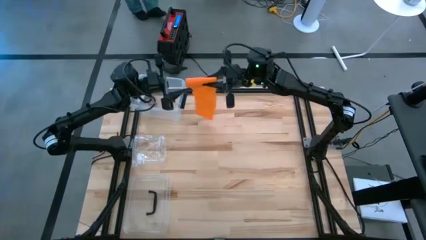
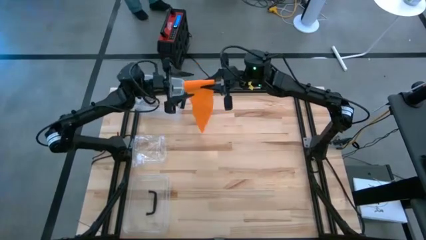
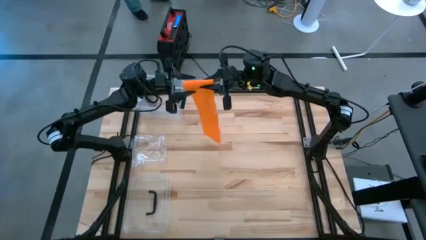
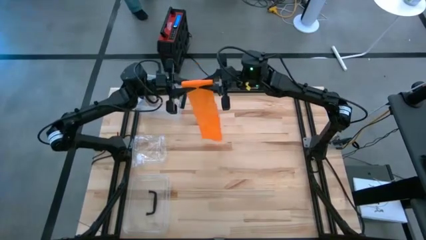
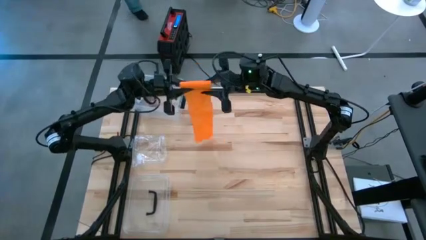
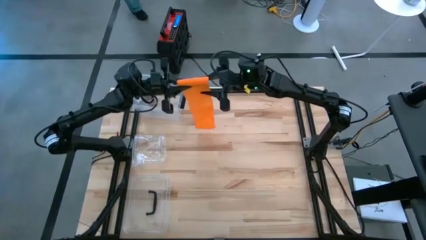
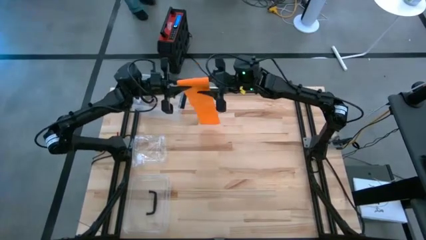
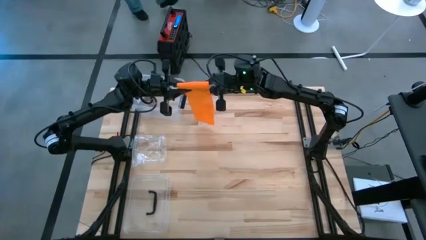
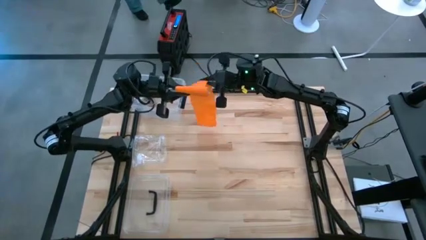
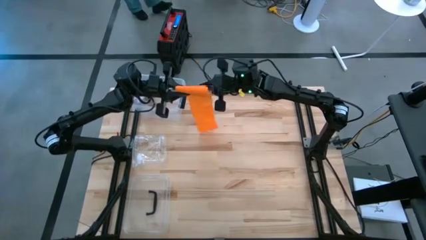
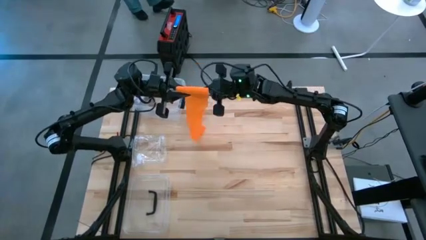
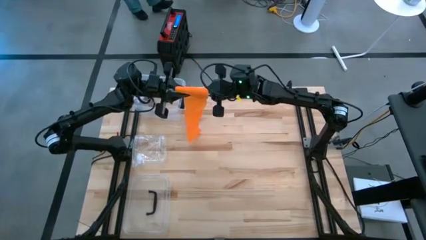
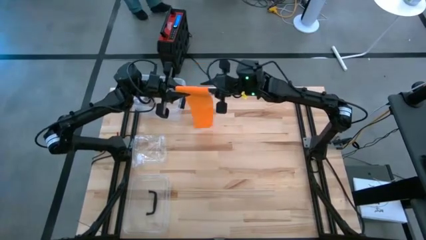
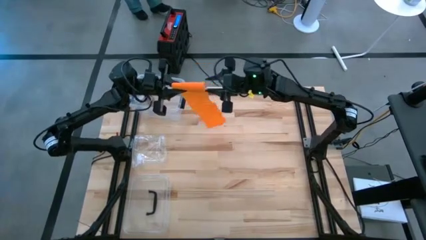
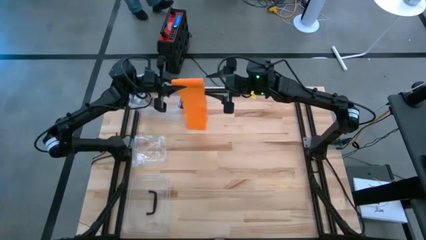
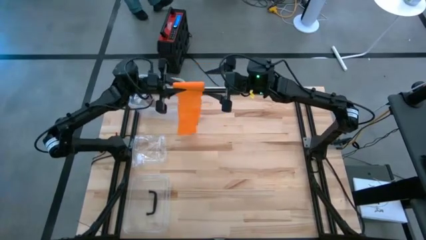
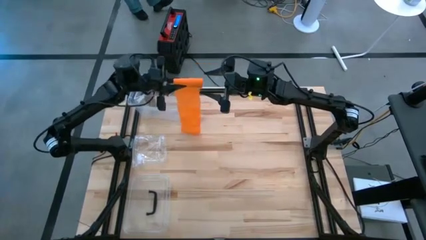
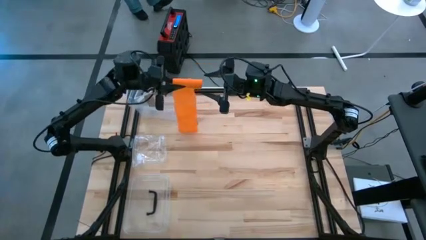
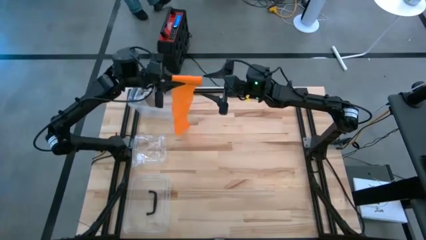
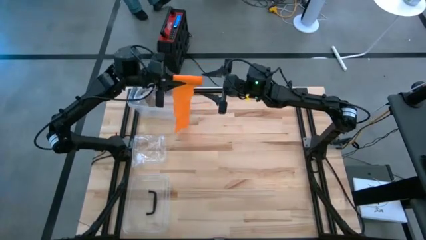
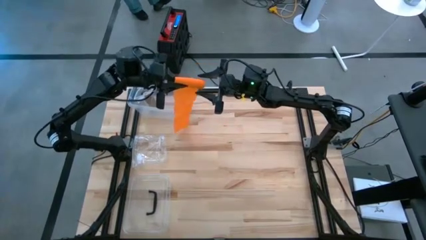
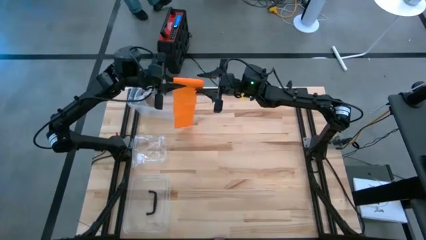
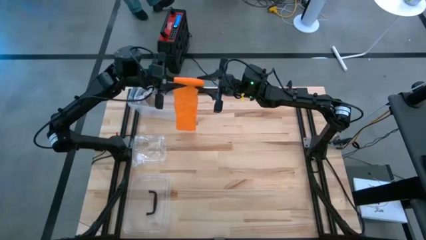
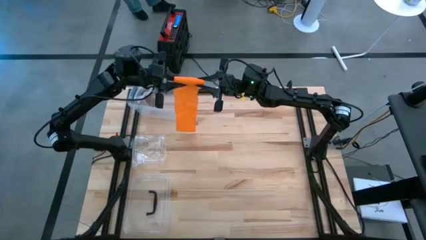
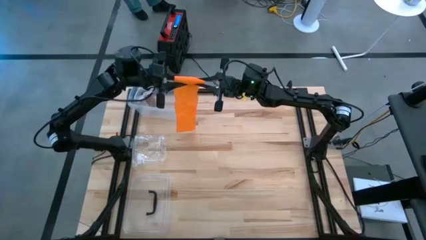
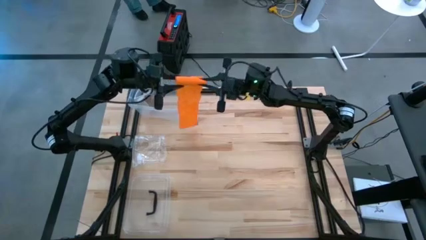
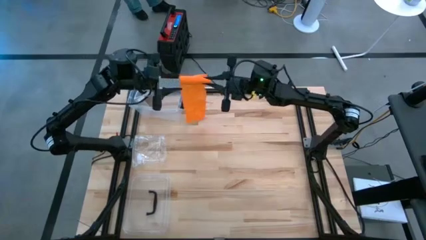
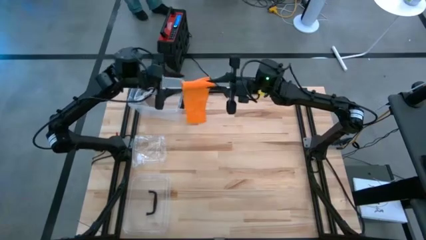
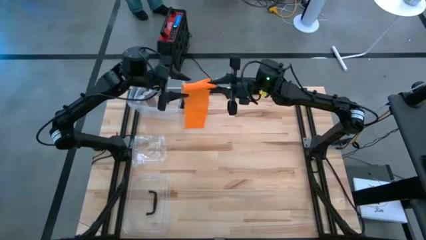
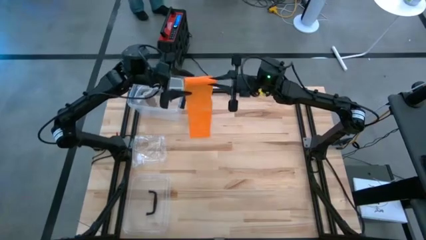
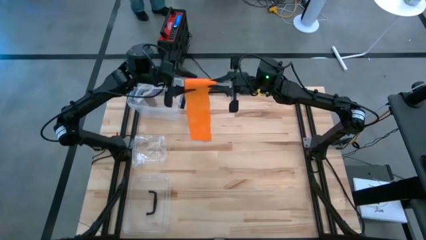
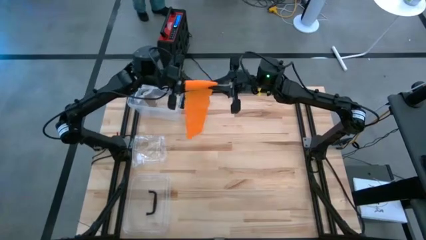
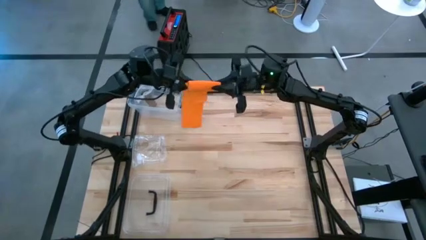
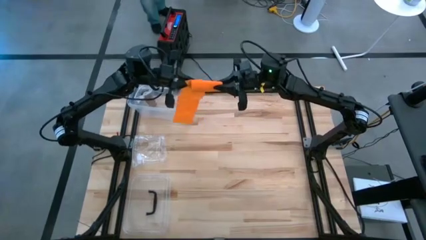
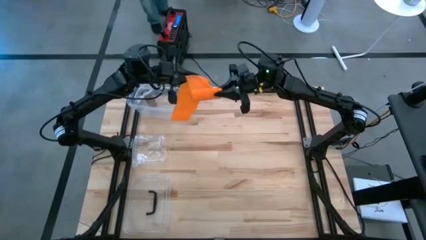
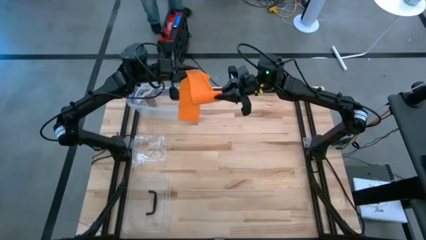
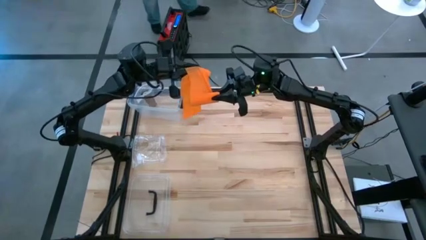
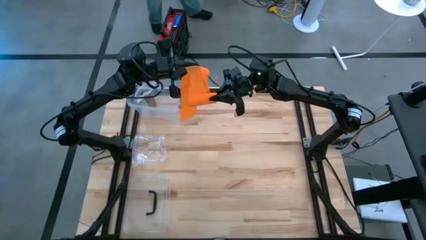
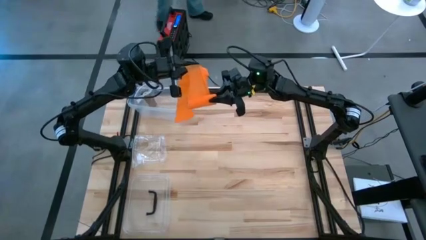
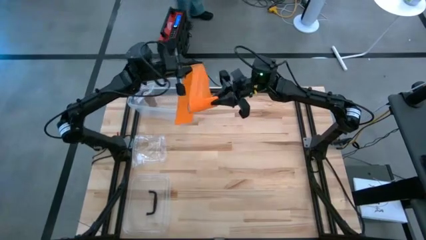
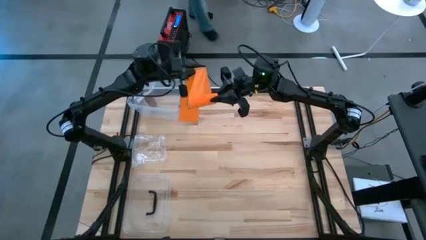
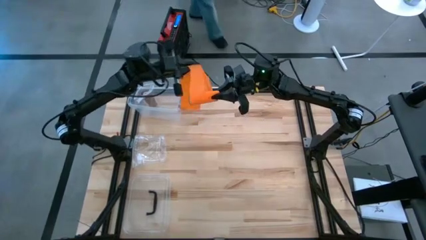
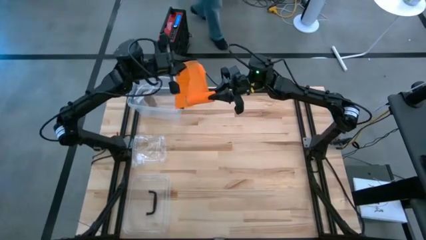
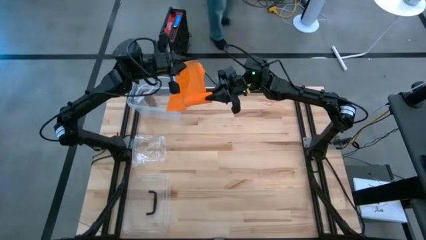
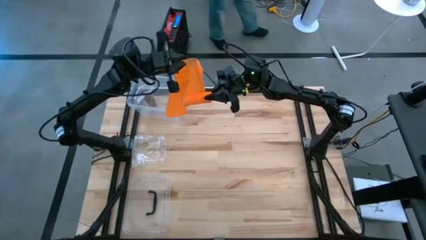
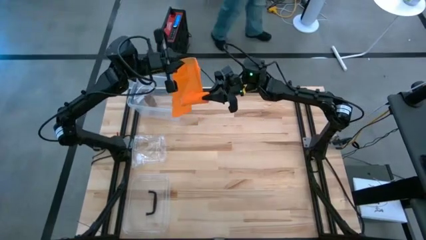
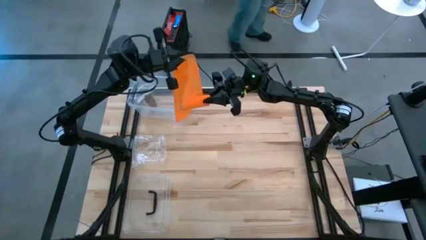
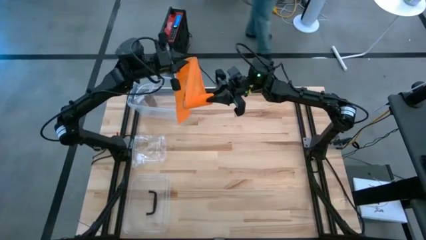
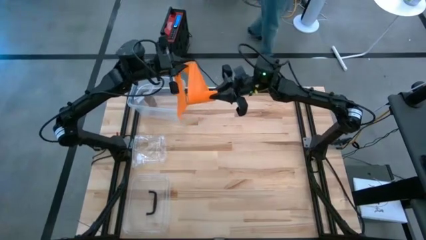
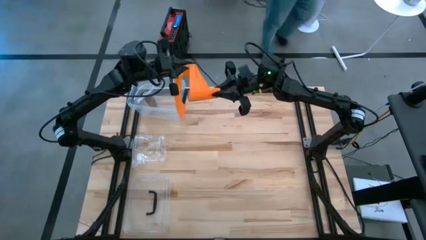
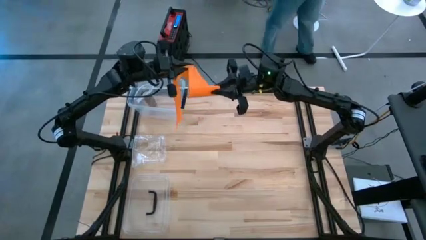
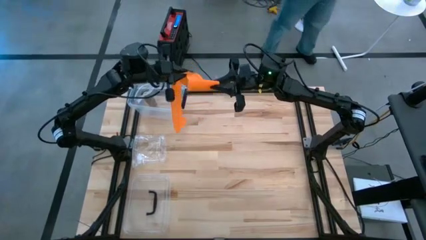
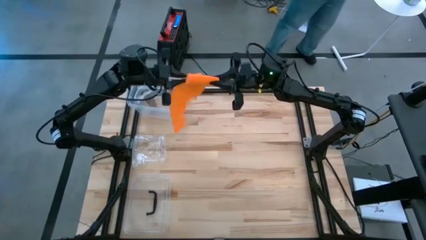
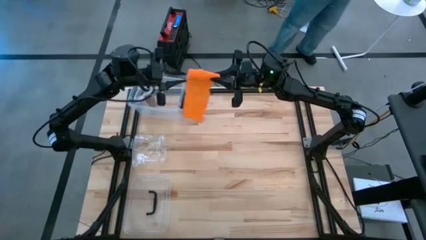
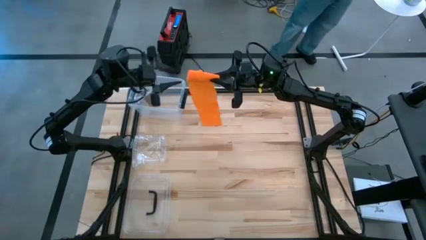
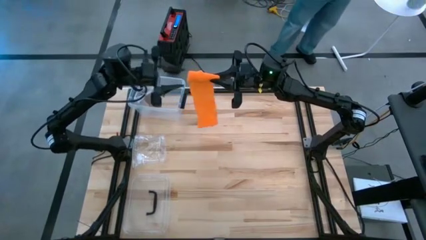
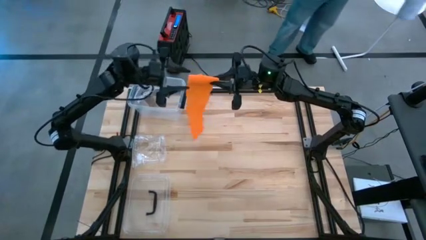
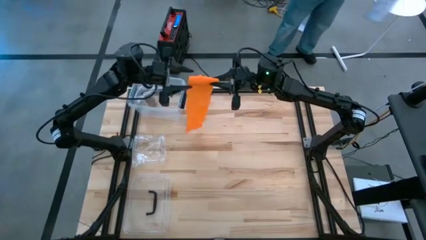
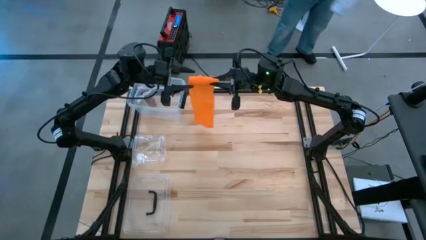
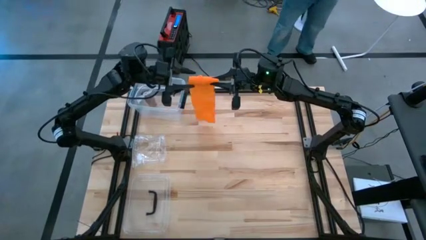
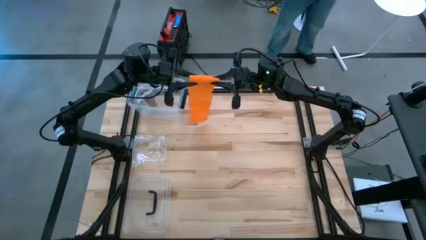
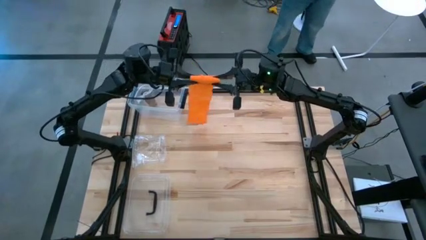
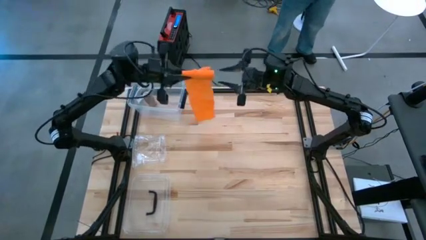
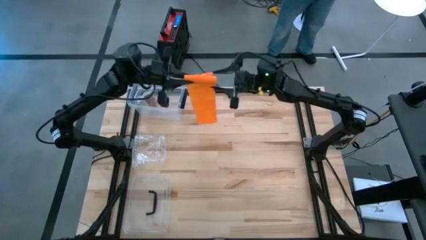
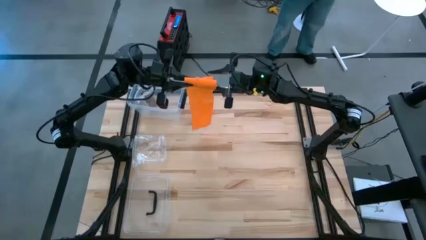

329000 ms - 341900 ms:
Task: Roll bandage
Roll the orange bandage

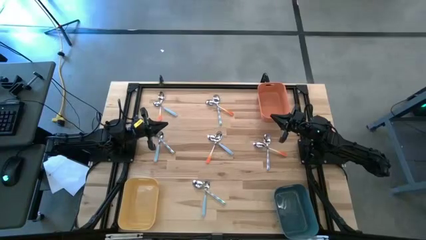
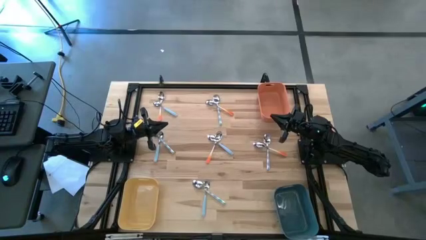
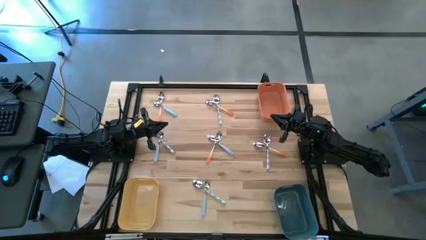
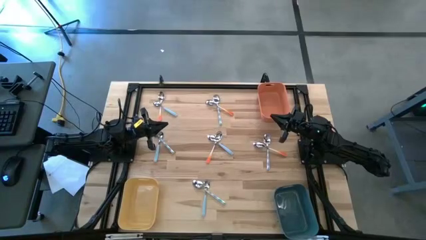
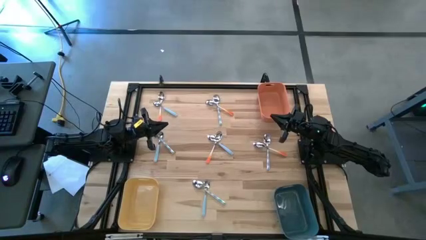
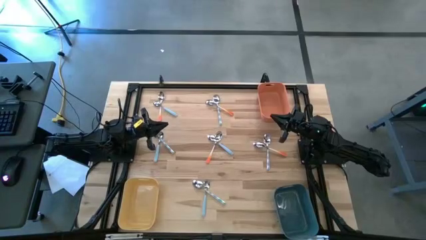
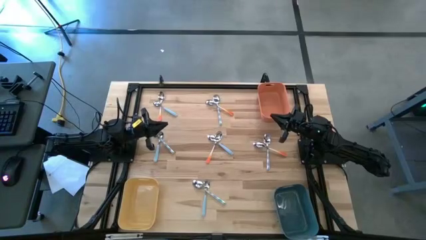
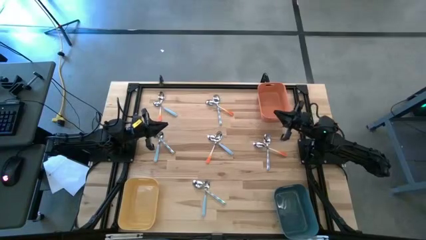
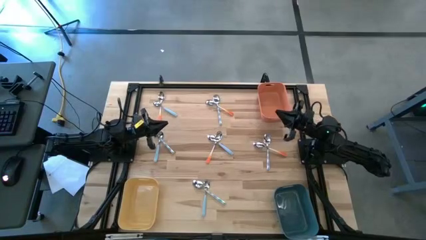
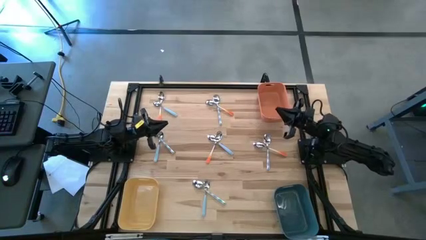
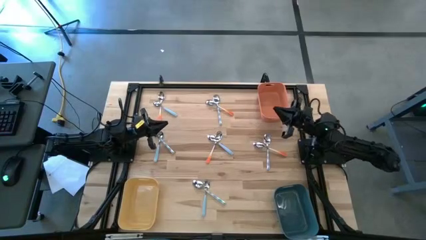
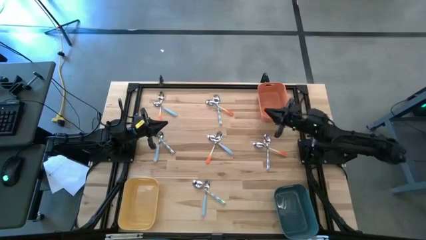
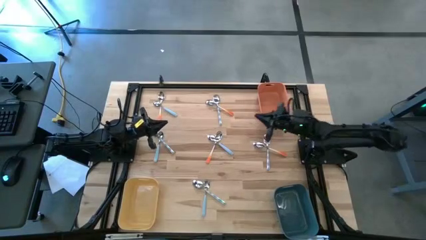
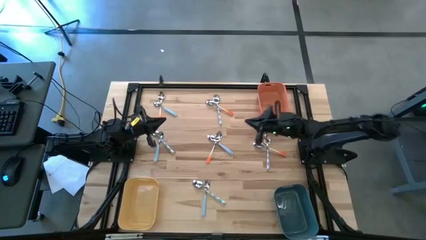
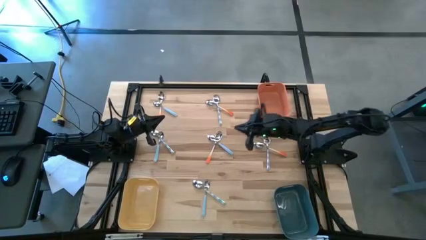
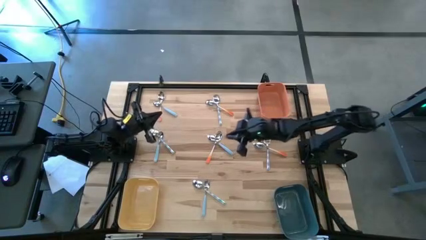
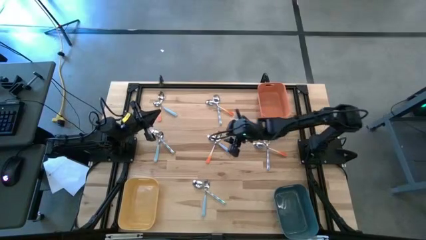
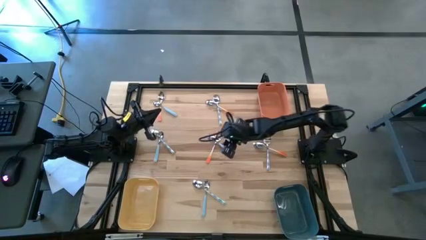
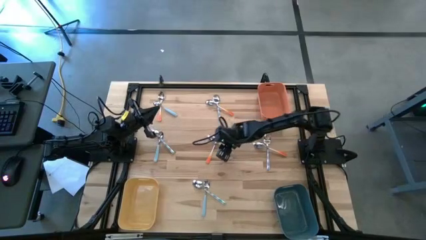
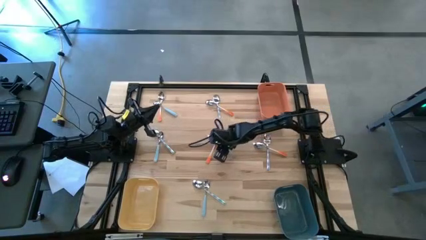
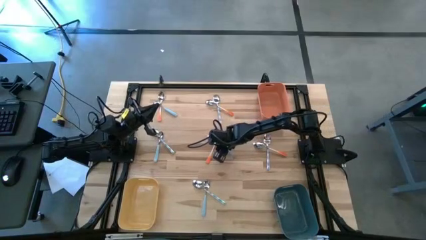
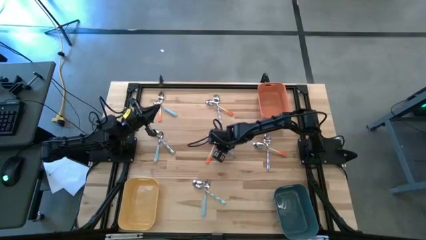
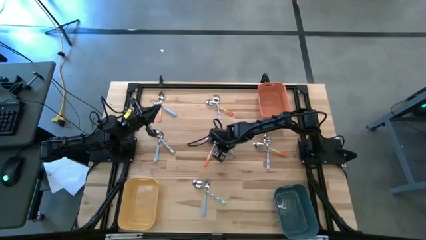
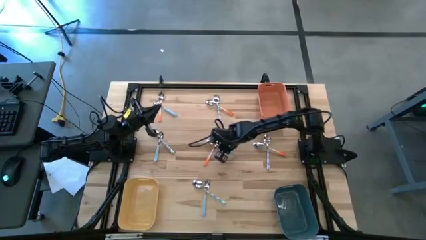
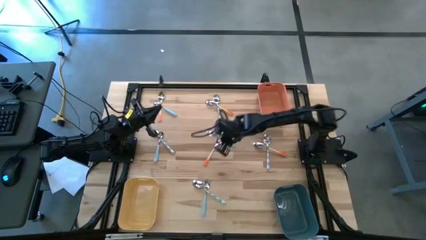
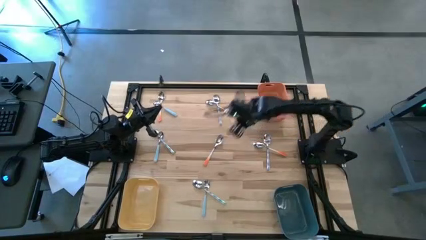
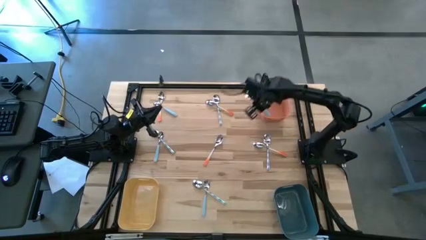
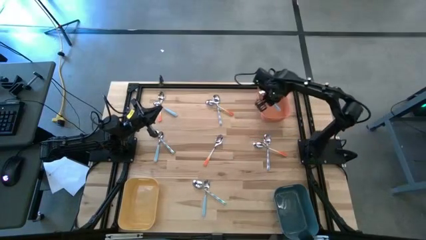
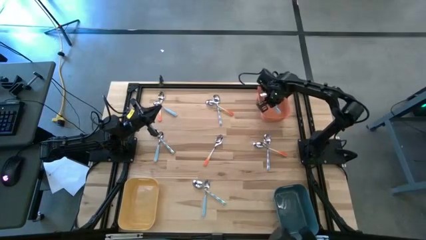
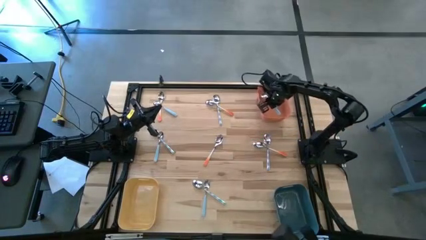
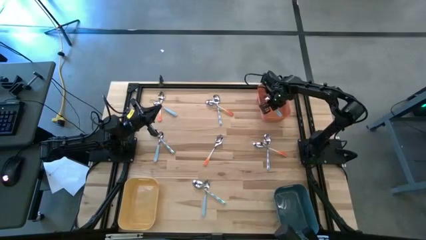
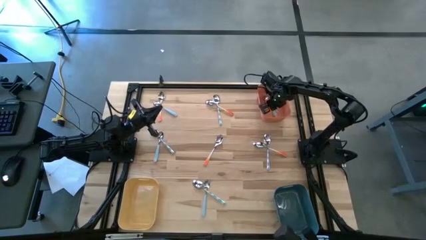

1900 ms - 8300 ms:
Task: Sort silverware by color (type)
Put the middle right blue spoon into the orange bin
